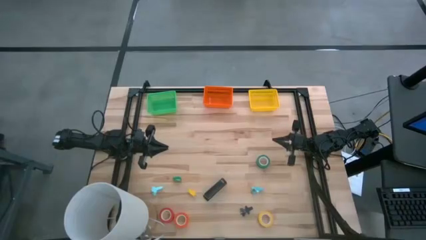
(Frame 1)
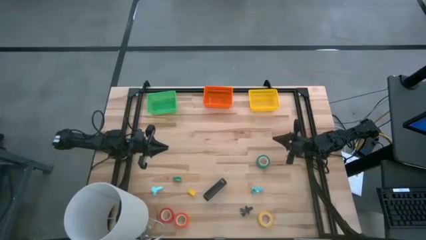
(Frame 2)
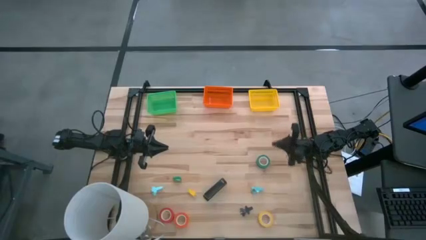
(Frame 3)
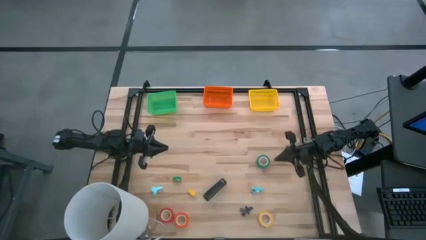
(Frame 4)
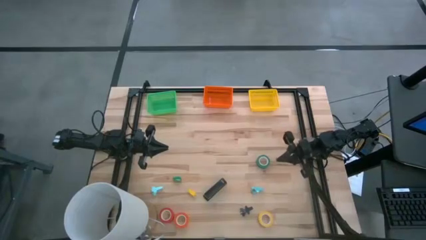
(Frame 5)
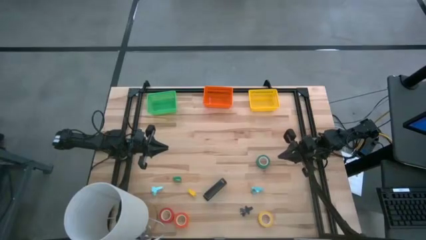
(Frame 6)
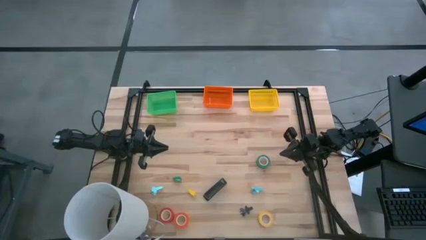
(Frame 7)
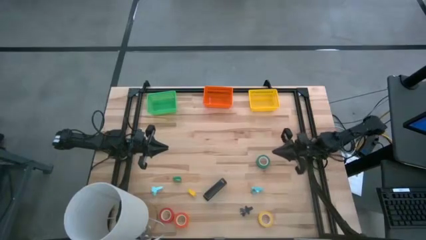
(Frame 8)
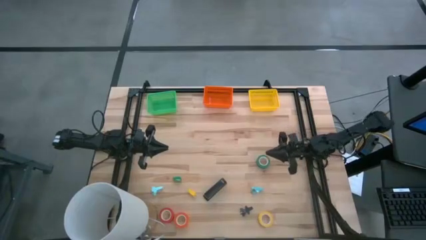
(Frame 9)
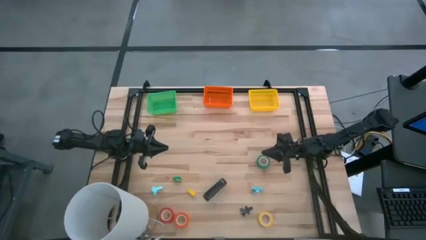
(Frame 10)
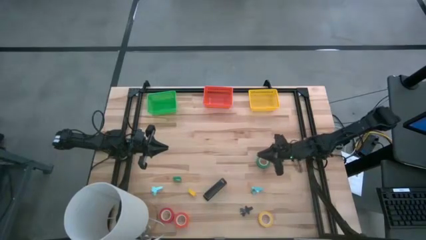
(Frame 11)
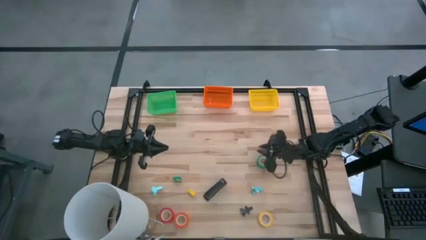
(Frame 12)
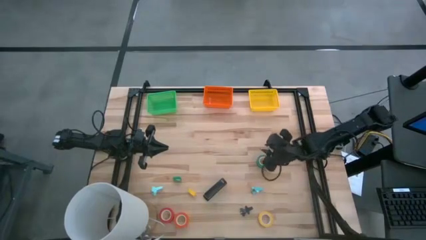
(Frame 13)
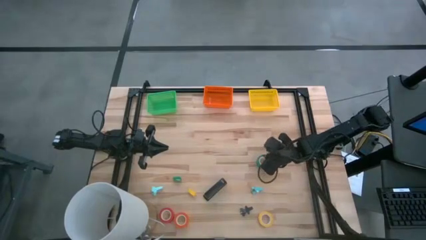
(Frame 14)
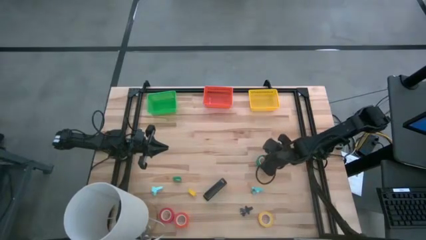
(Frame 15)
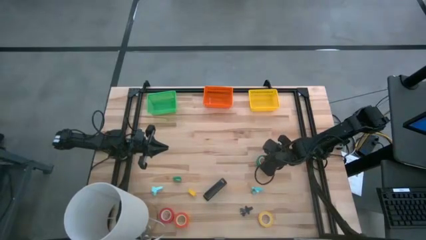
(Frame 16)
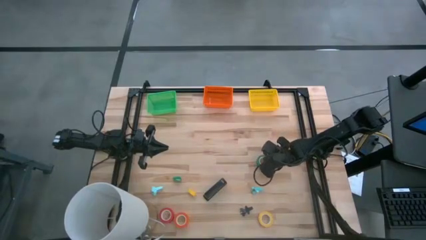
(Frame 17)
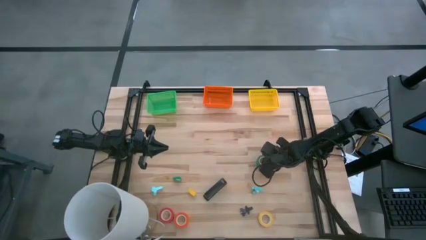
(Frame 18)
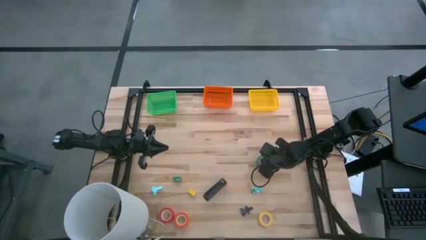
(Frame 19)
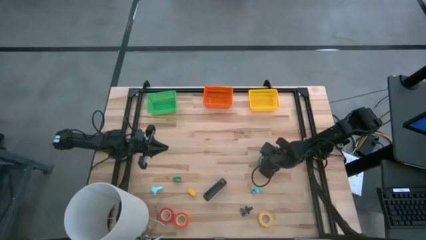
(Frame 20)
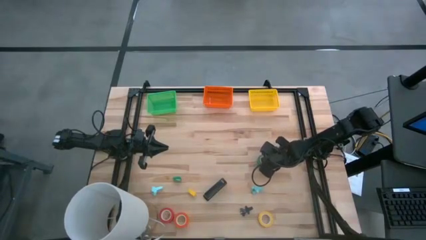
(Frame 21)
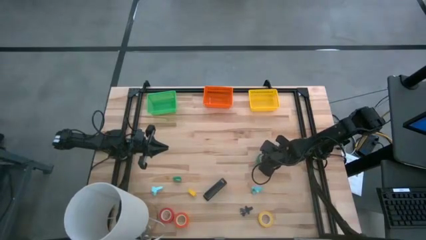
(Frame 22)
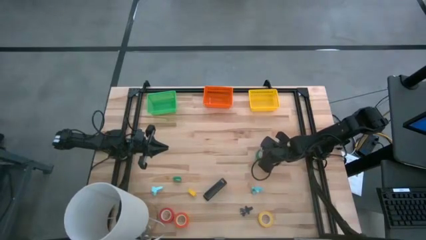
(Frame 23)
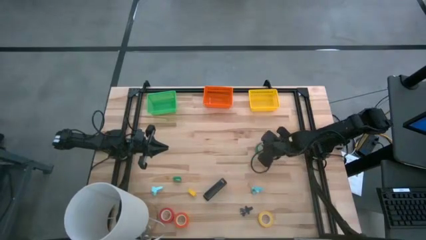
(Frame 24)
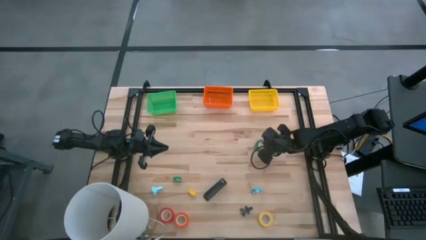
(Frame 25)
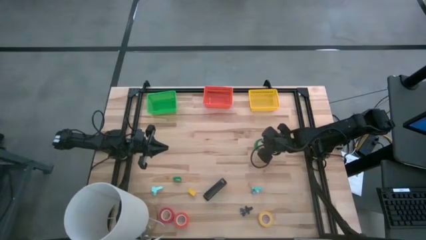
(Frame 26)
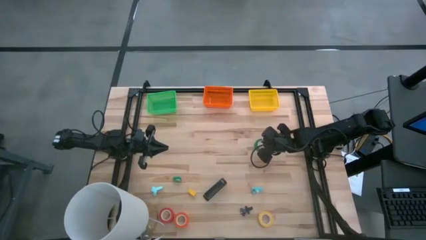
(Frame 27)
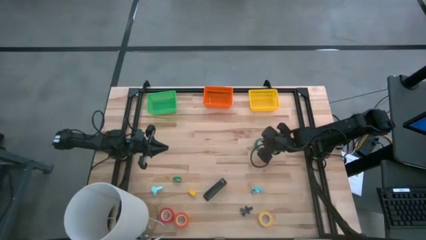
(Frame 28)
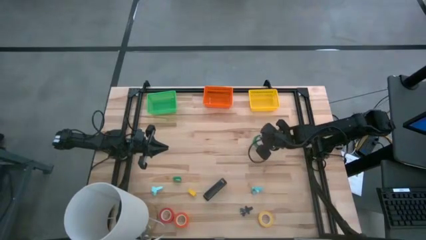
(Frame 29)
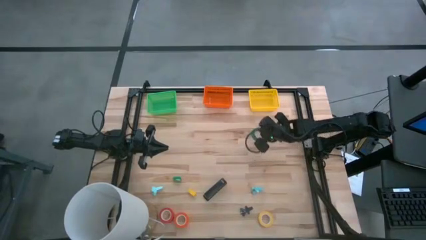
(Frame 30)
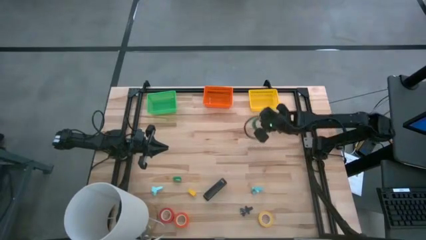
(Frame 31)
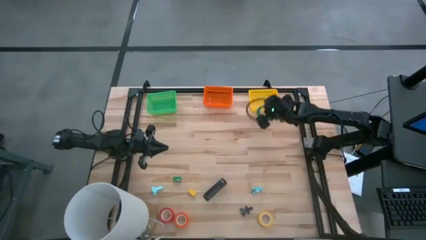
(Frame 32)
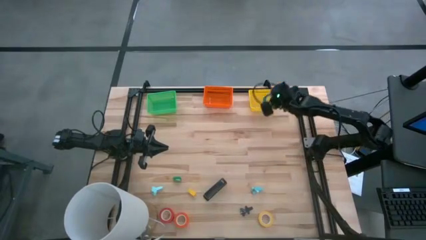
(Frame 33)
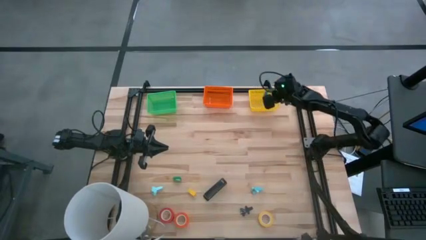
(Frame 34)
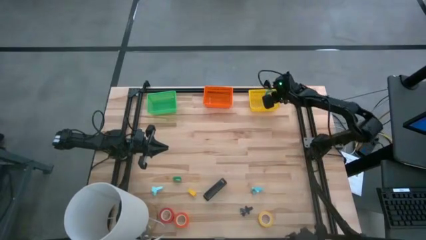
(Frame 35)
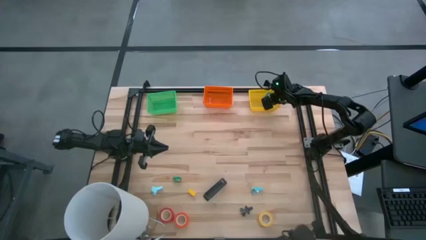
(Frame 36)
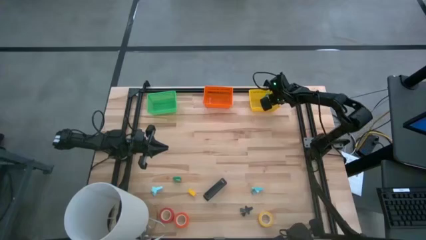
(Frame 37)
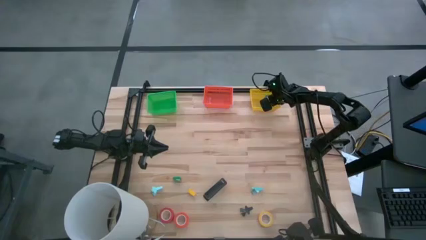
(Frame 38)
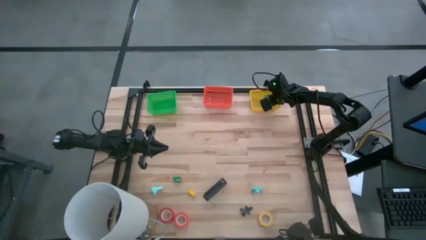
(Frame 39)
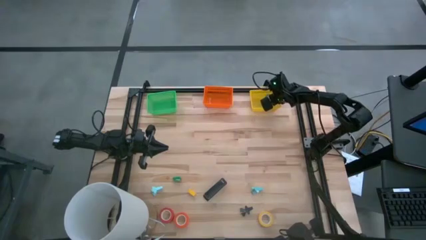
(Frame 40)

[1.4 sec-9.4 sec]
Task: Pick and place Stapler, Stapler remover, tape
Put the green tape into the yellow bin

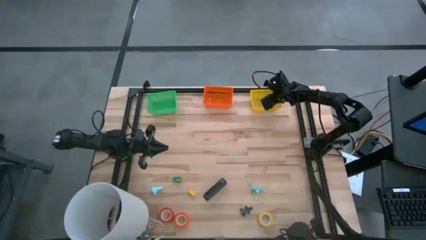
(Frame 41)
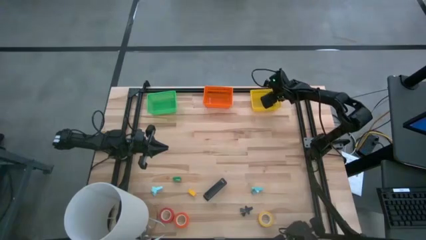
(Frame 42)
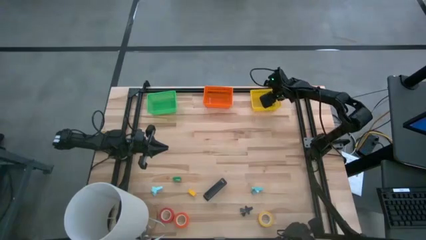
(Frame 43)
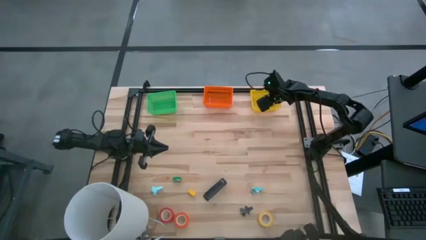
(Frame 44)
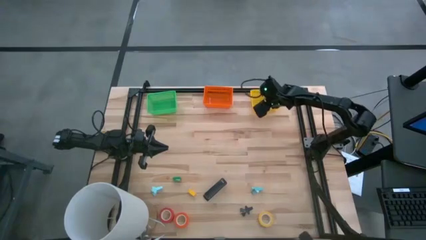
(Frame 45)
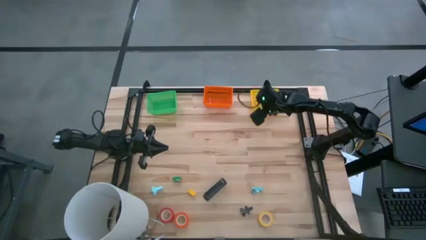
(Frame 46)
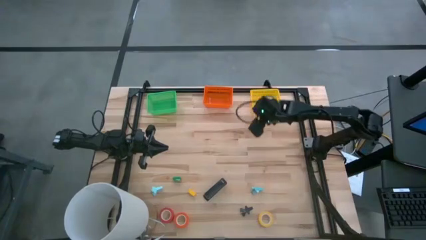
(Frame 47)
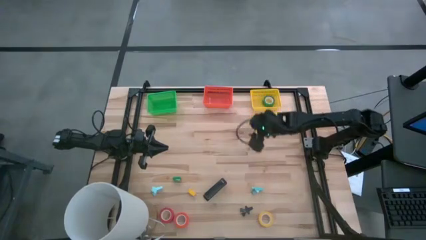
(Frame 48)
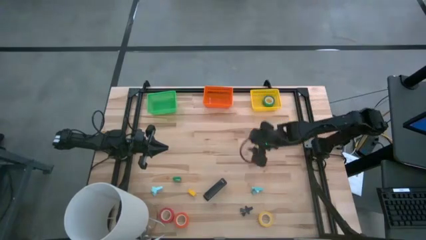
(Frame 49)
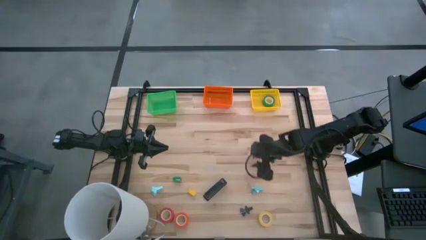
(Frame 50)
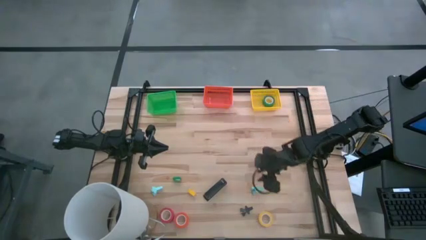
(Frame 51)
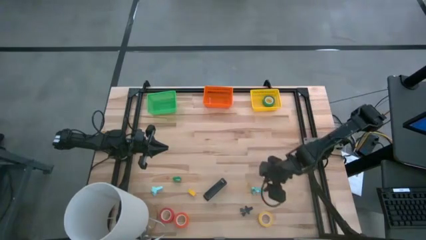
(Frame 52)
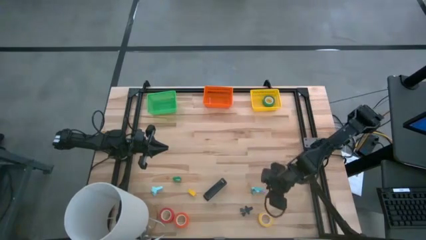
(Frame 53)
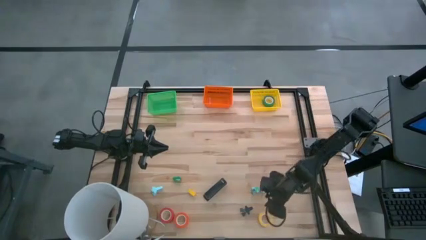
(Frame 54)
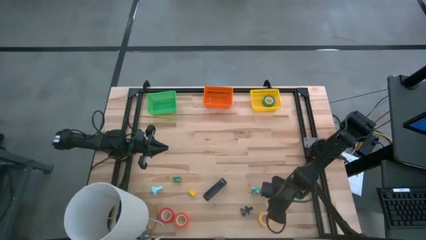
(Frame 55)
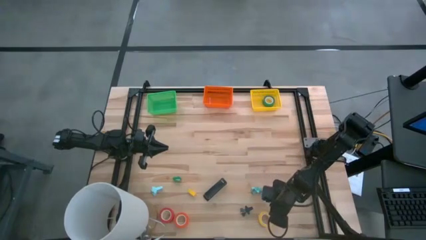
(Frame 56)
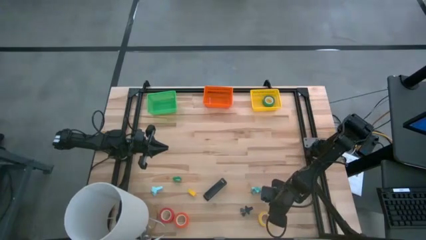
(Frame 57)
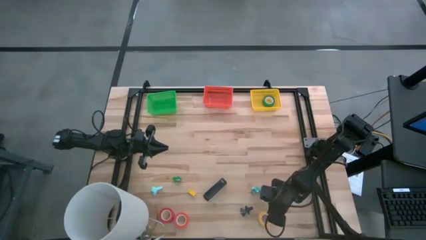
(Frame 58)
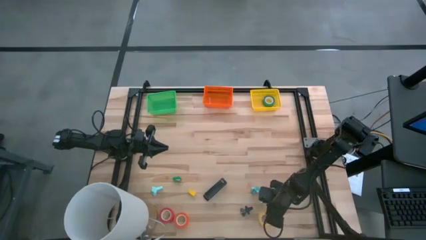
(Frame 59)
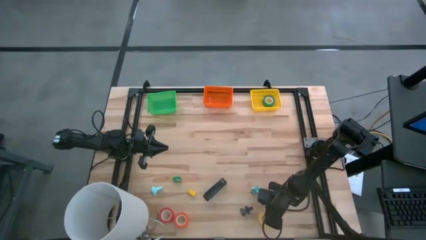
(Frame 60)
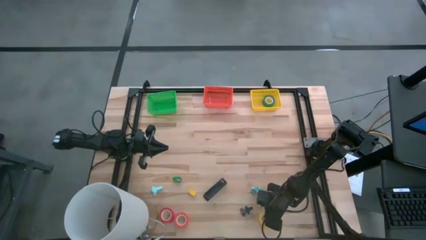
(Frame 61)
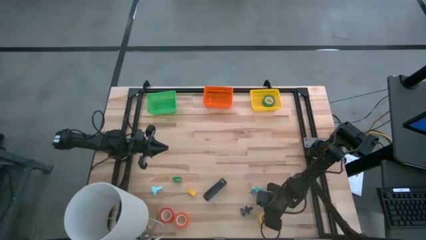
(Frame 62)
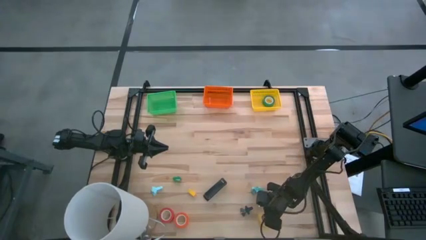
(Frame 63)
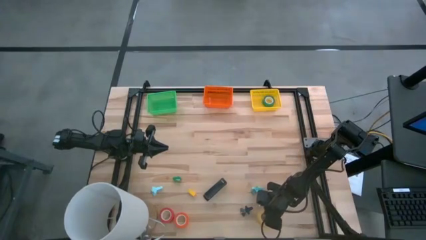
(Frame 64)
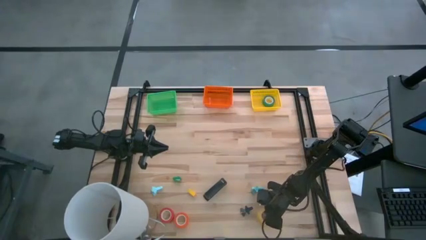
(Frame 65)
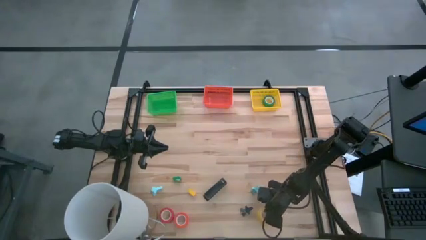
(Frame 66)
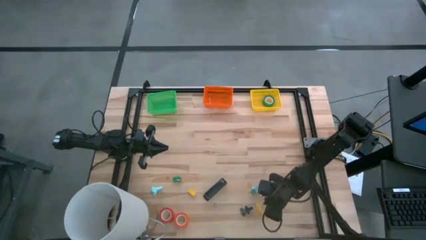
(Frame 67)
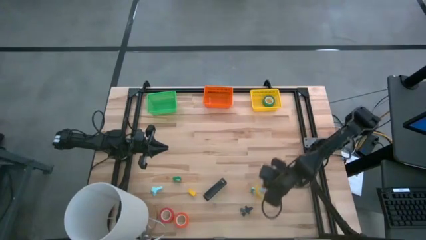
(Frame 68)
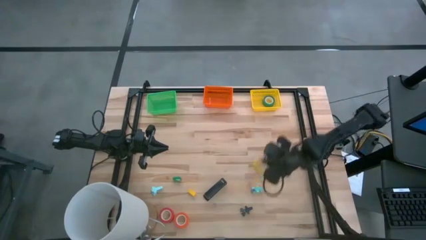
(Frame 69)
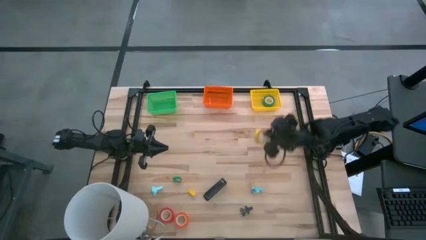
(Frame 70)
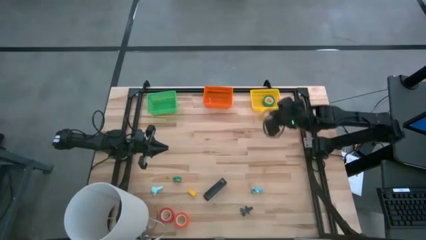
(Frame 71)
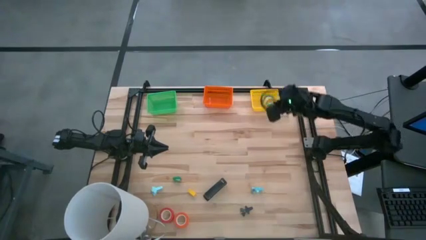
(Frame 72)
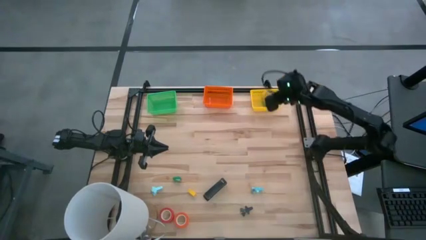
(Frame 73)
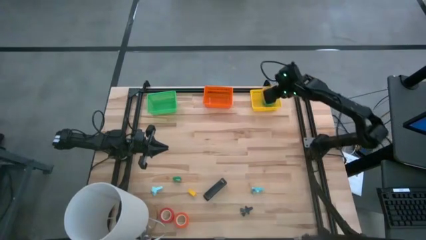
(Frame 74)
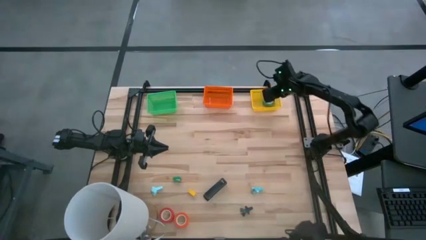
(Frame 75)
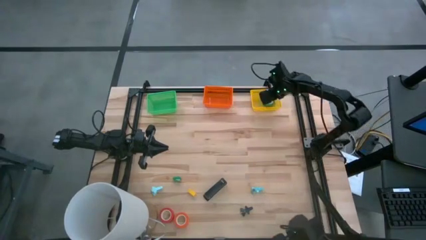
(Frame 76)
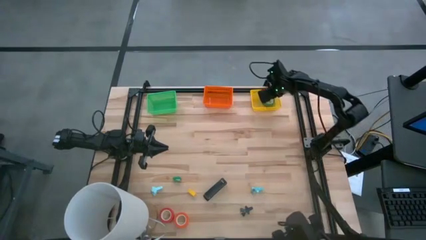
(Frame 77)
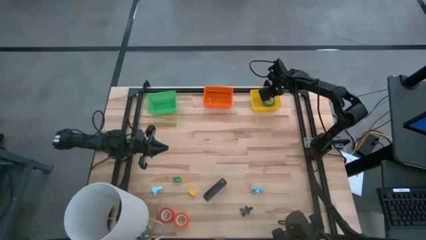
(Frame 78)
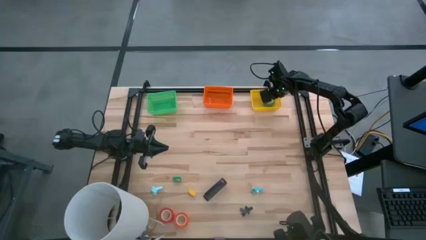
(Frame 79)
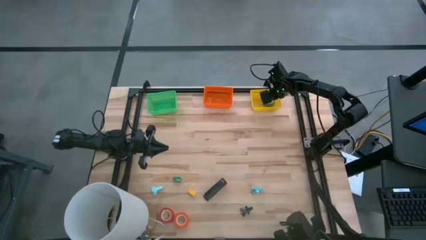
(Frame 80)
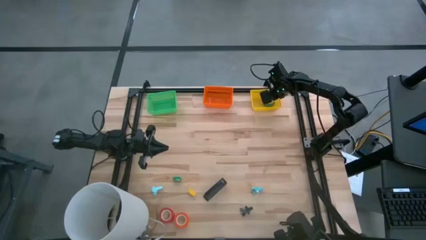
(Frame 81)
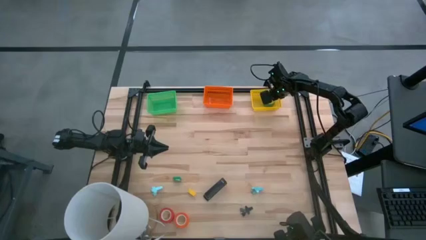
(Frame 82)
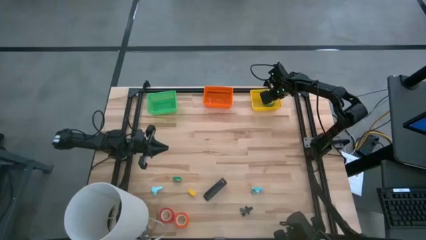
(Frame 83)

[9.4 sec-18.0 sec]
Put the yellow tape into the yellow bin
